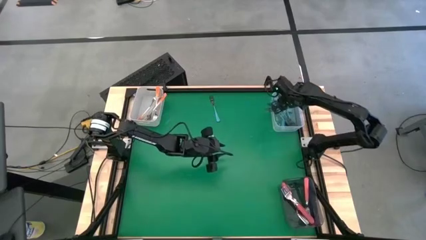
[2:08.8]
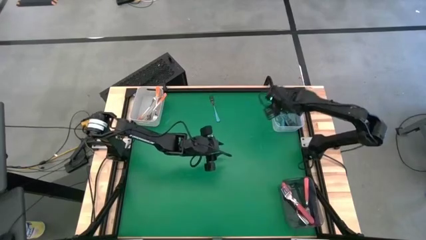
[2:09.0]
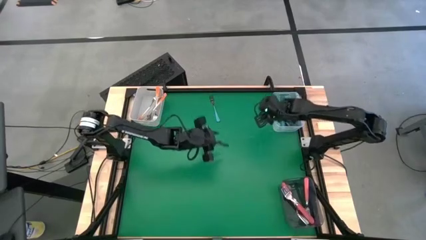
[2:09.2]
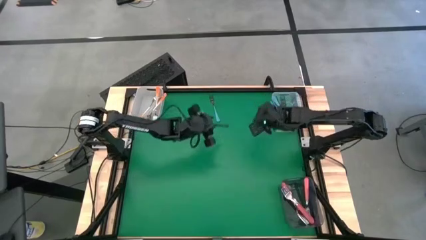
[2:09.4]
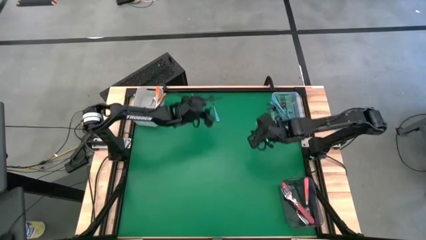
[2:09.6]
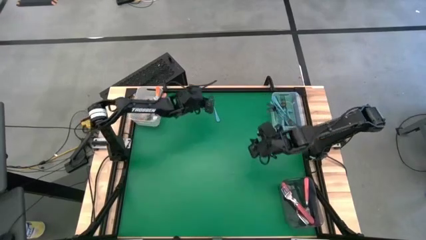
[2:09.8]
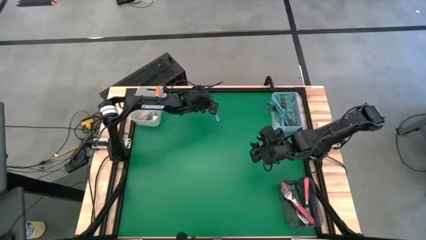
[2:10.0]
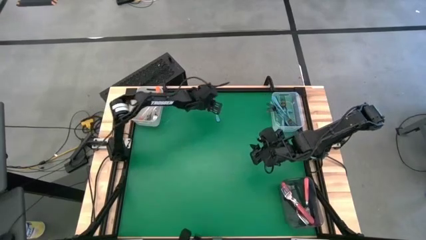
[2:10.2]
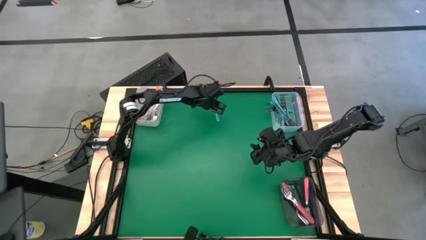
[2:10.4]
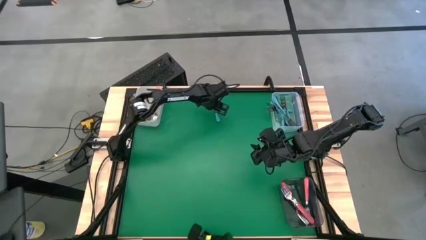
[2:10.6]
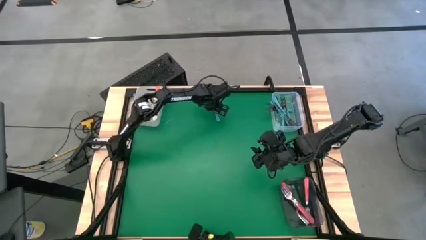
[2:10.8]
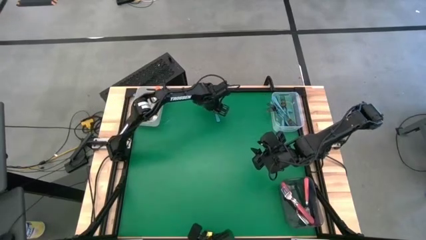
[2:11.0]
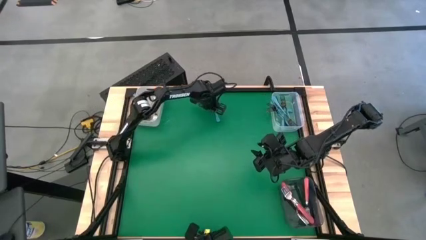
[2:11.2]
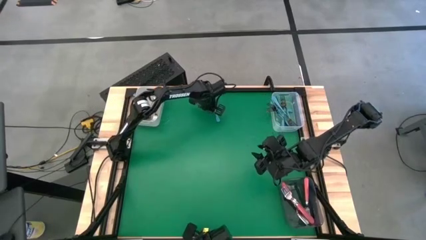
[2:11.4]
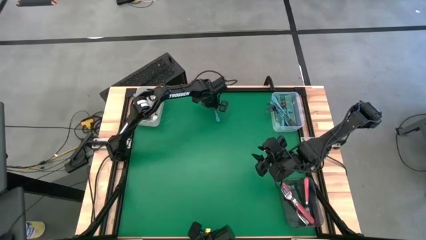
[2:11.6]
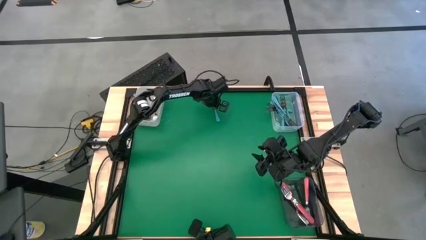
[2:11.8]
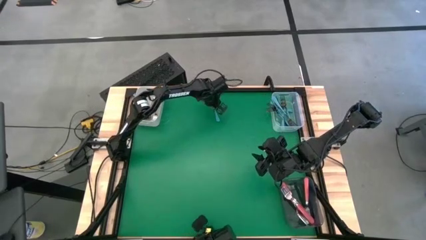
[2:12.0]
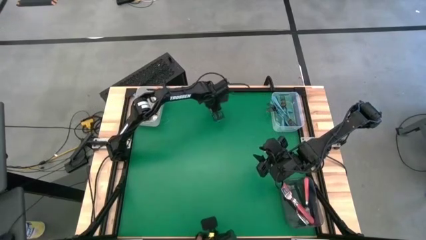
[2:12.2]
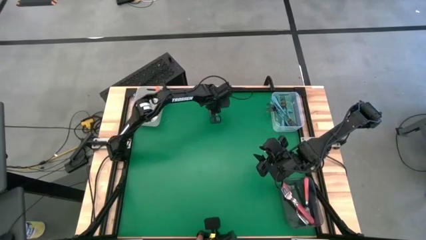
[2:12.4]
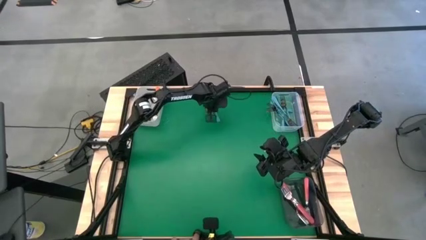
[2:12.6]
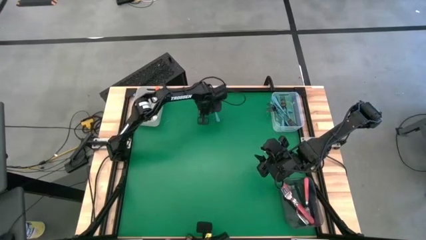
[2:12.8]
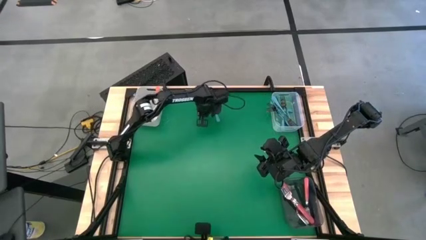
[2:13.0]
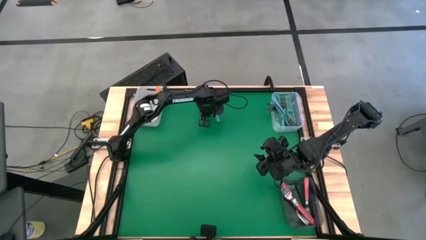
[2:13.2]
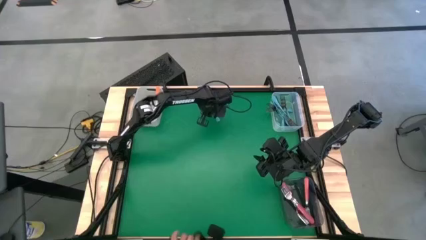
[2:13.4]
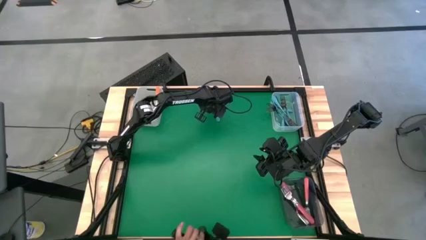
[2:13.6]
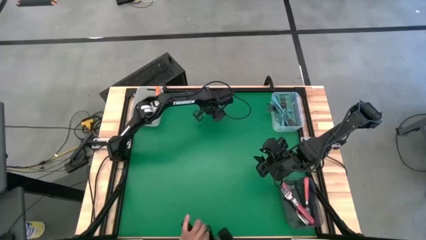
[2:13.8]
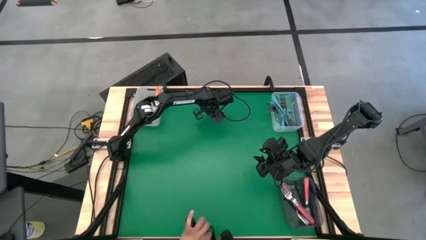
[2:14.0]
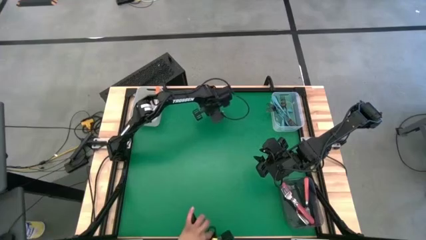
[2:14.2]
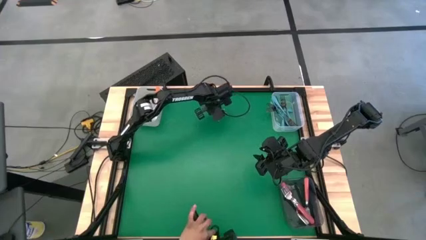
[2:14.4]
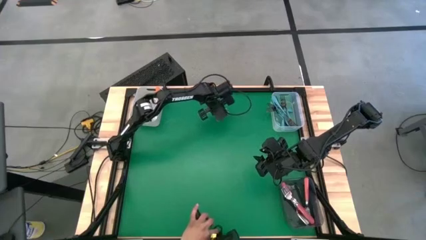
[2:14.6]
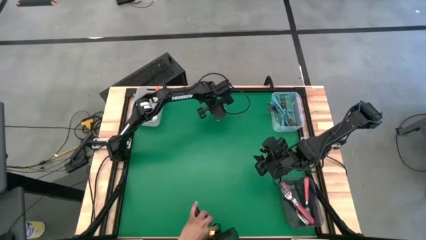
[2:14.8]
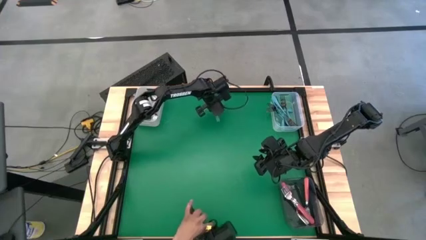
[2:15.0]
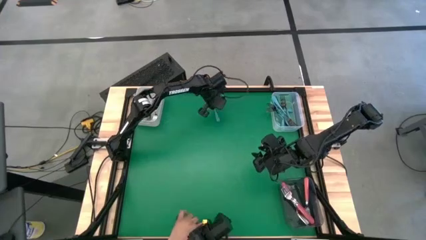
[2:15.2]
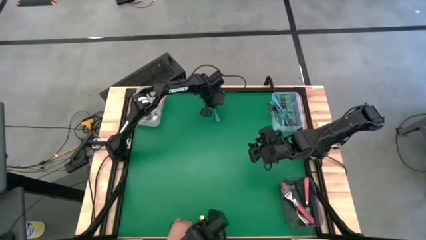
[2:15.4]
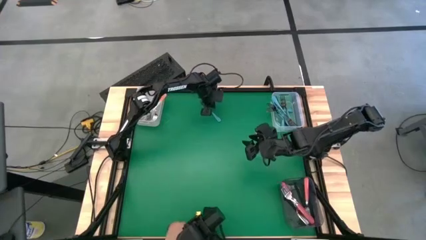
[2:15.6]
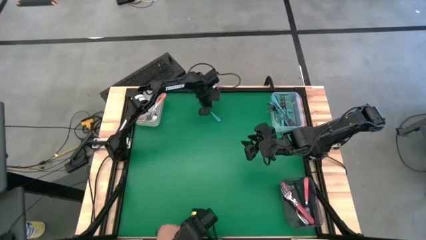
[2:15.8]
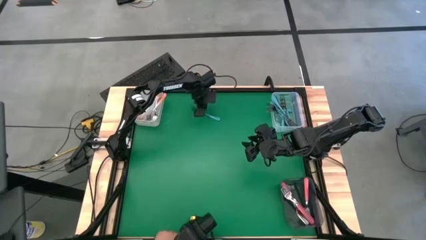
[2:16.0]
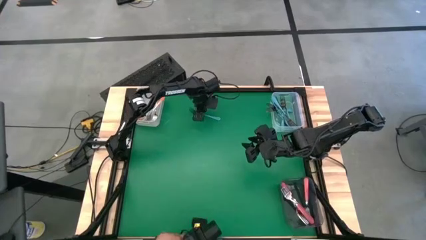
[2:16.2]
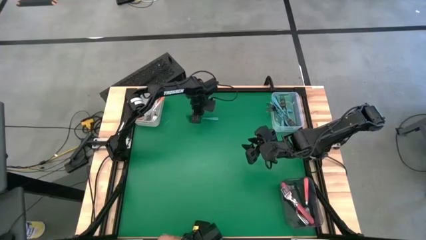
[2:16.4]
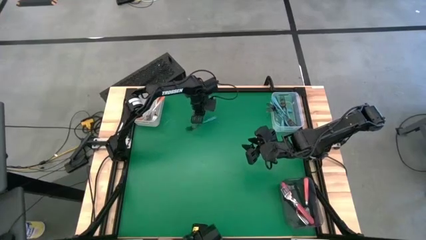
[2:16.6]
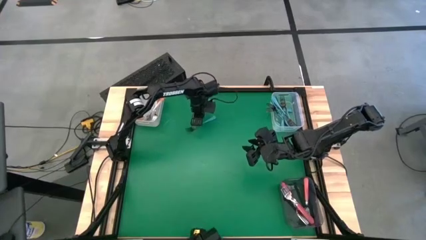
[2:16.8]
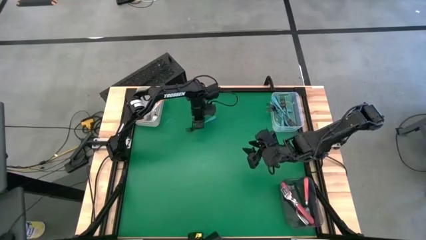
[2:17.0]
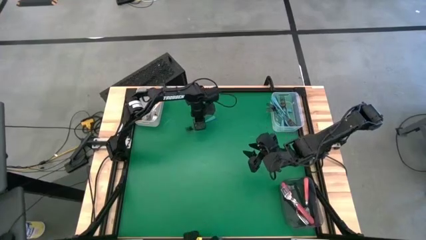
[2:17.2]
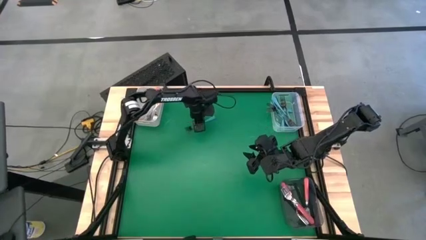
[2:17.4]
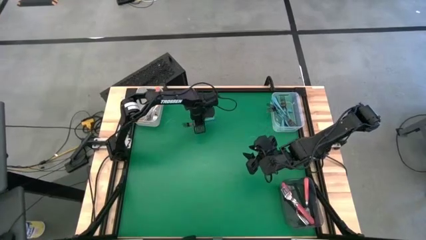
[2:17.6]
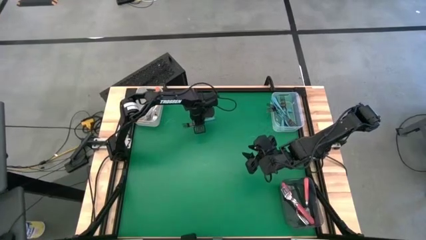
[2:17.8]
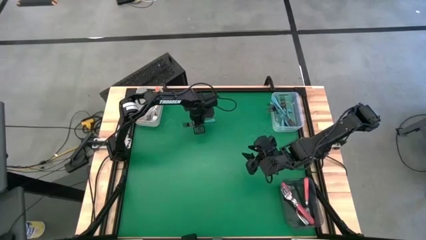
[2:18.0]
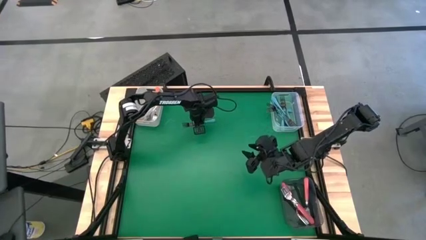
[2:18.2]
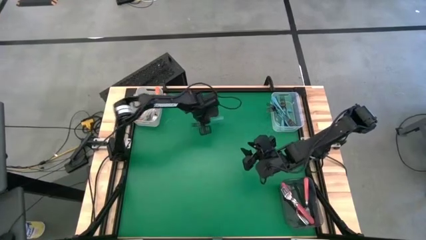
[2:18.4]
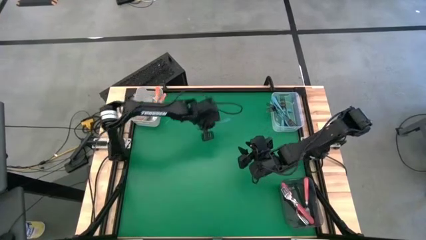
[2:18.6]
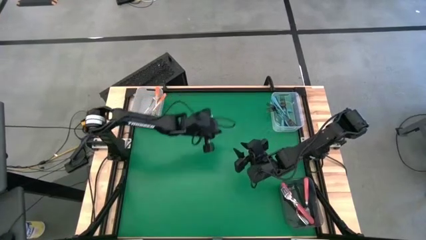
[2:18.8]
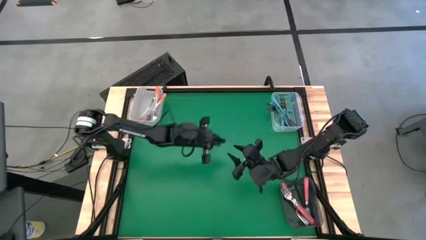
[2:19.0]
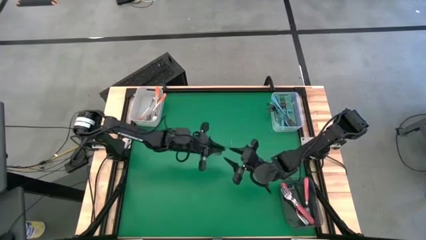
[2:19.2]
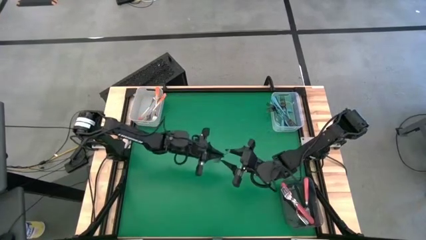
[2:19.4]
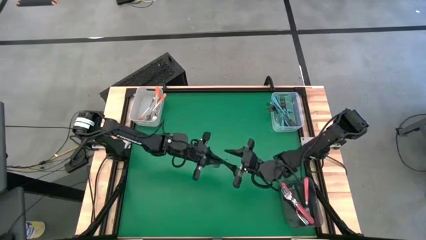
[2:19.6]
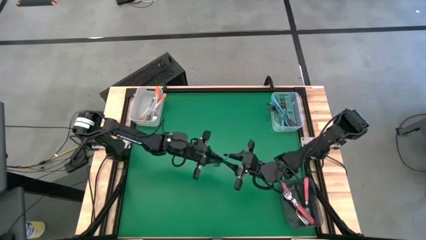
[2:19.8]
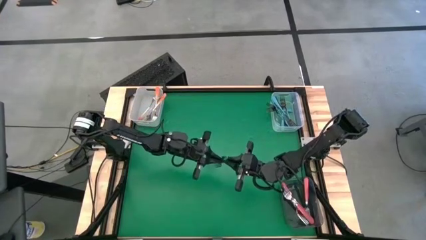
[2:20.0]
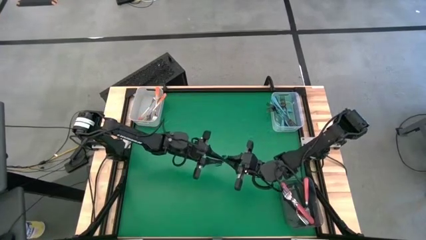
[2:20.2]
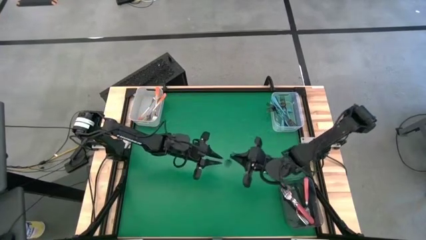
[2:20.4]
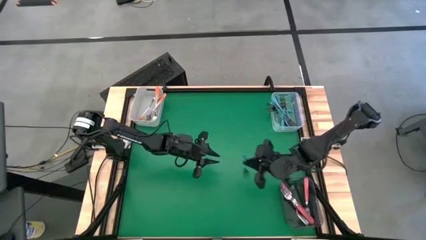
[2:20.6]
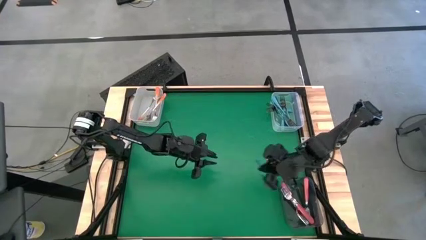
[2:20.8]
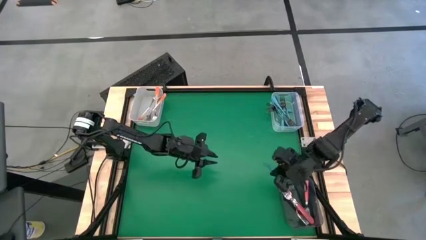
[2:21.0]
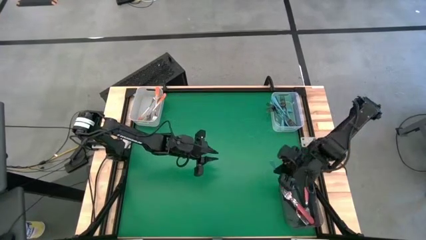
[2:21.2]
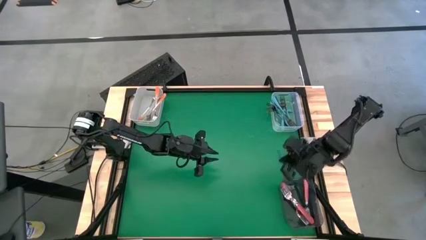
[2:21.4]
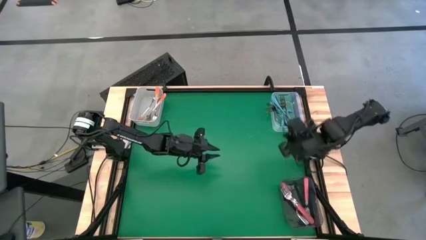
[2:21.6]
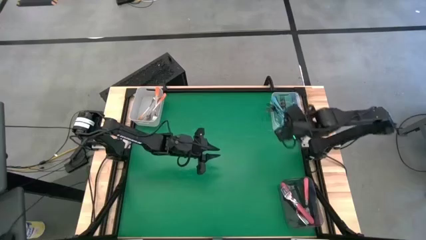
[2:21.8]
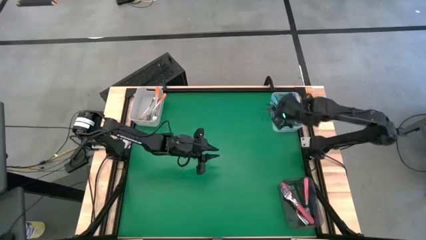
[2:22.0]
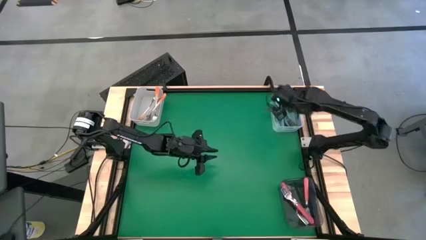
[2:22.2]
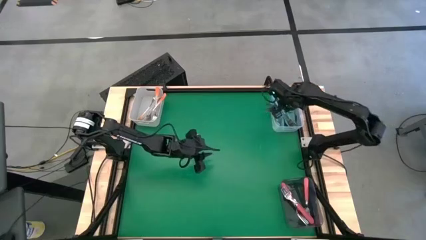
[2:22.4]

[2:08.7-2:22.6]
Task: Sort silverware by color (type)
Put the blue fork into the transparent bin
